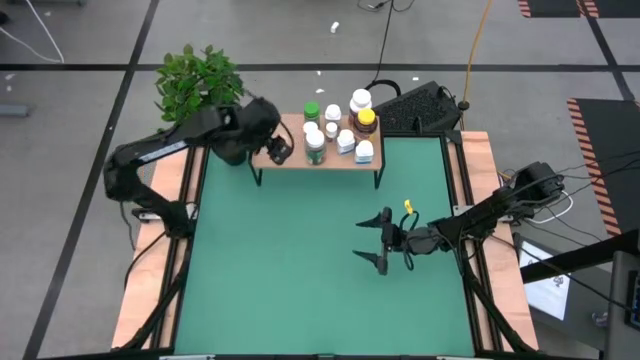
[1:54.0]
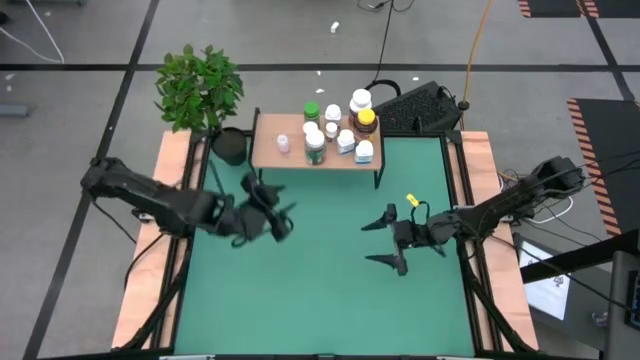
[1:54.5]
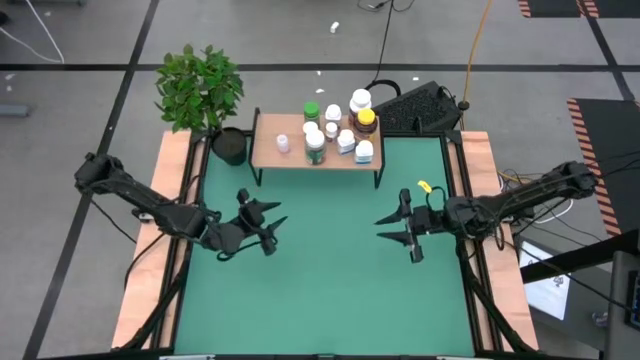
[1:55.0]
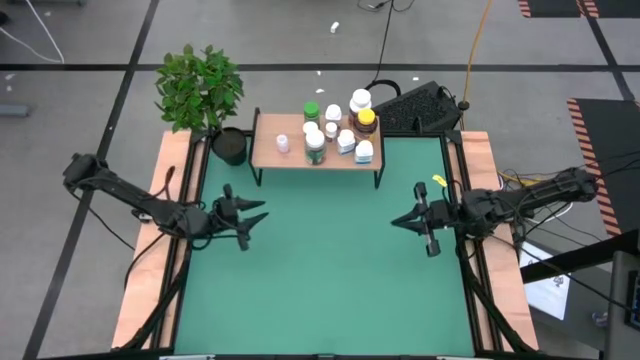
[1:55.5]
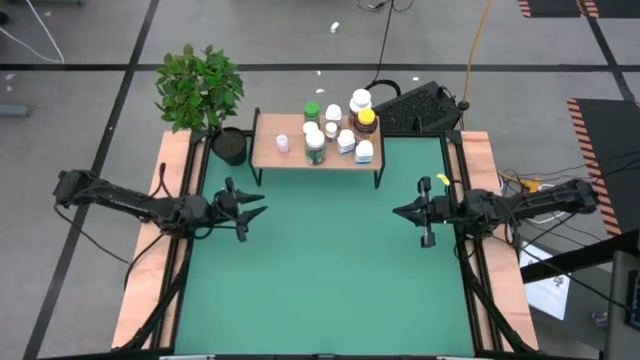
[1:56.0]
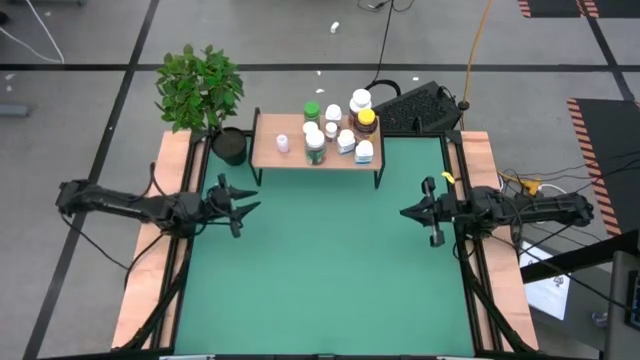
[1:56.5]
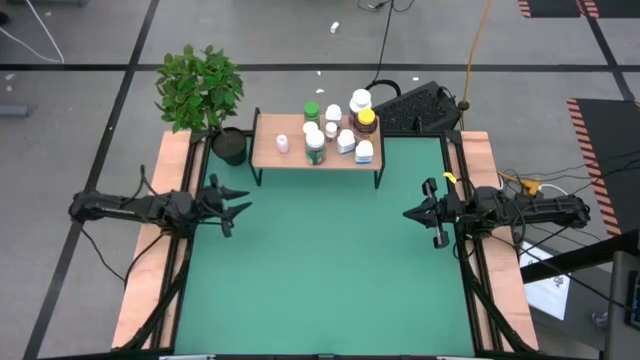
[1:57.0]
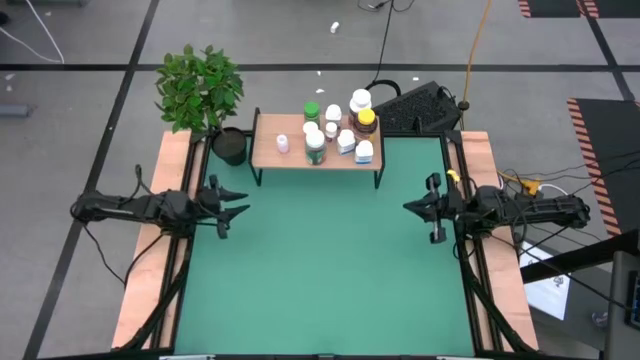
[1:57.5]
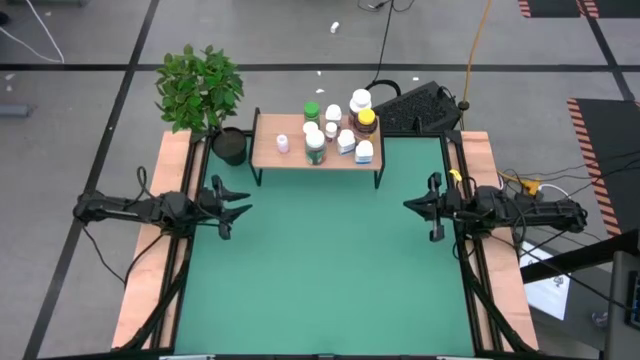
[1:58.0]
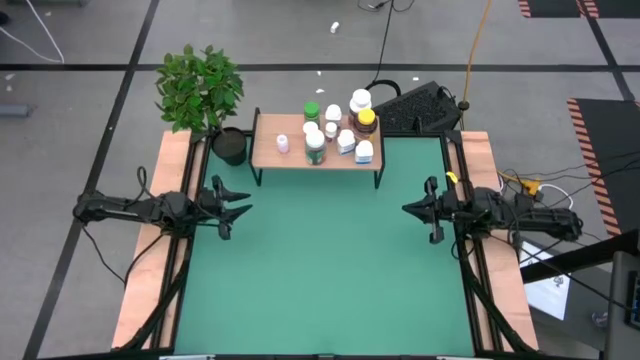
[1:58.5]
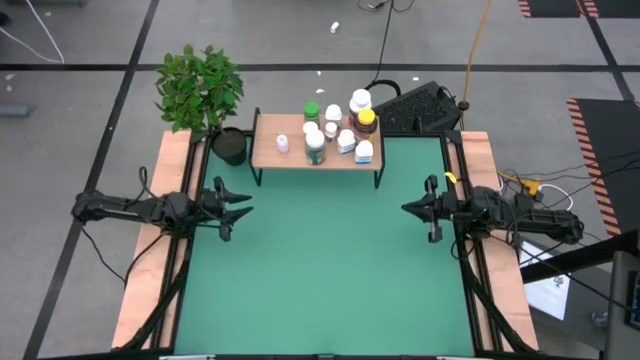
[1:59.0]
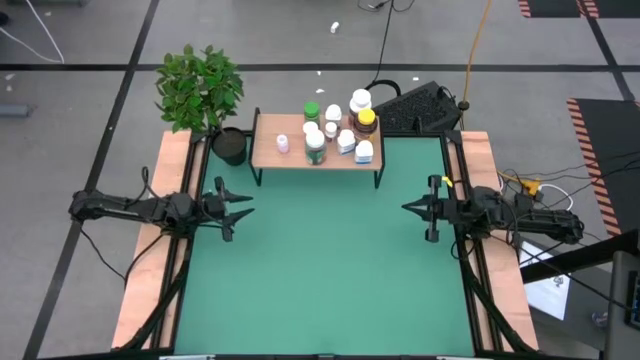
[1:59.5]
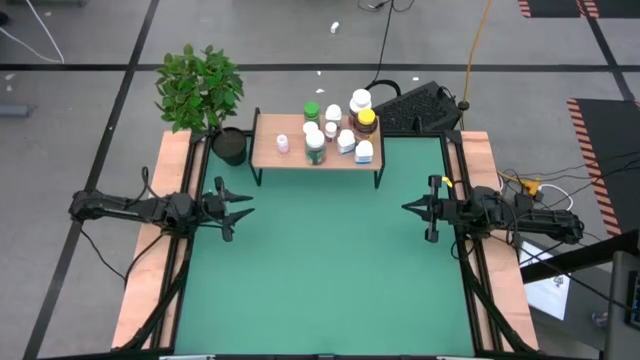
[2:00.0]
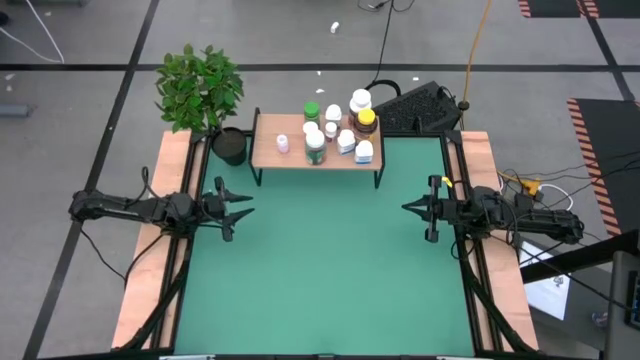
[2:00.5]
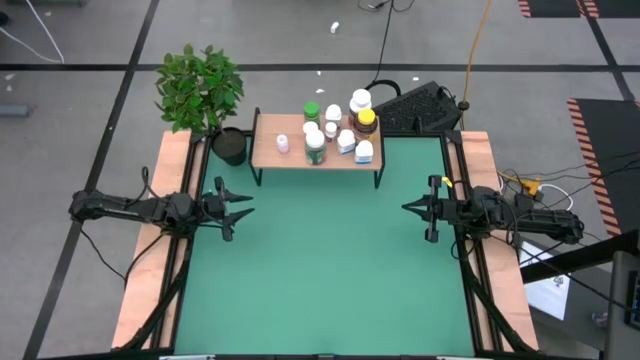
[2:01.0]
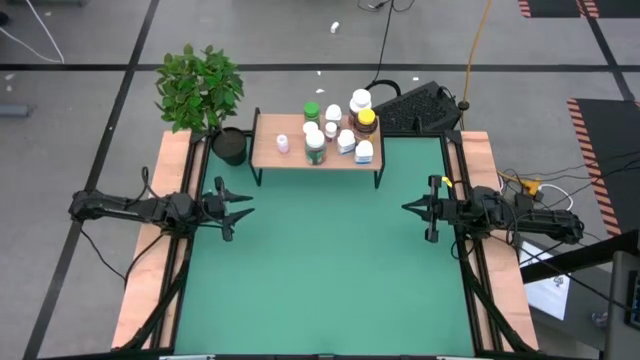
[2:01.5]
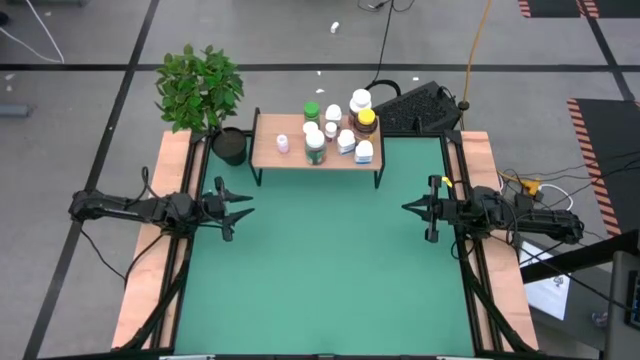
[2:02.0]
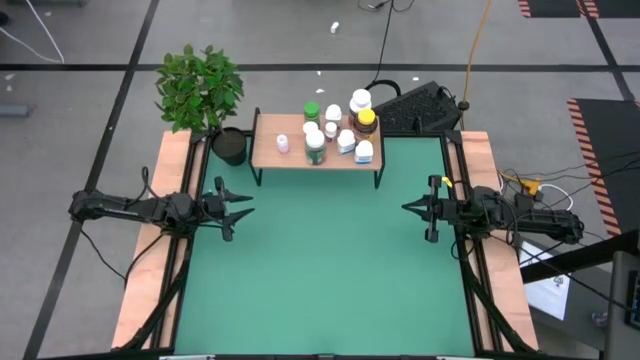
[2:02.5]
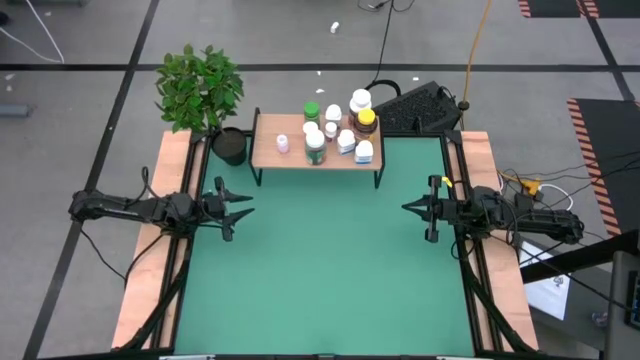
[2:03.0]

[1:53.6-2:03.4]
Task: Pick and place medicine bottles onto shelf by color
Return to Home Position

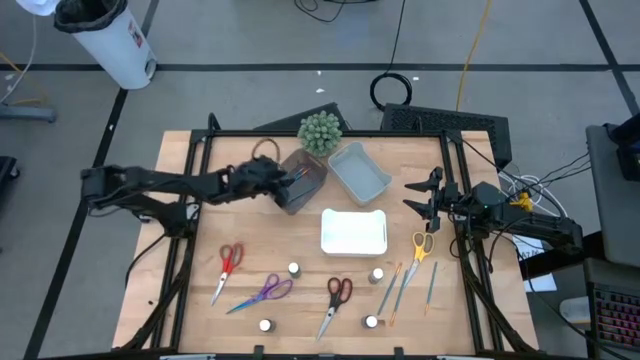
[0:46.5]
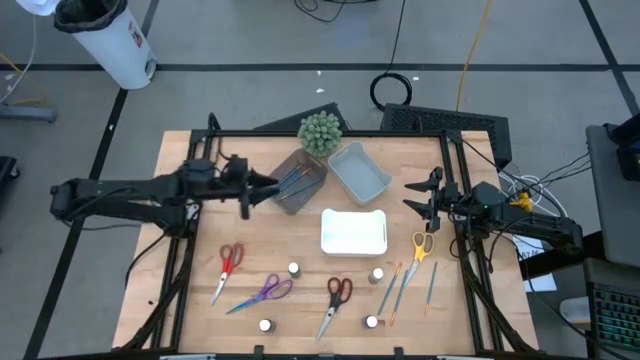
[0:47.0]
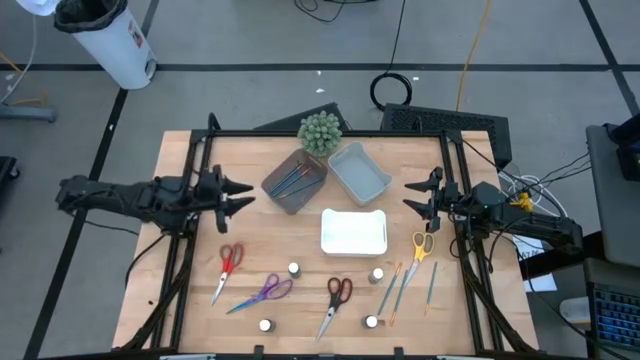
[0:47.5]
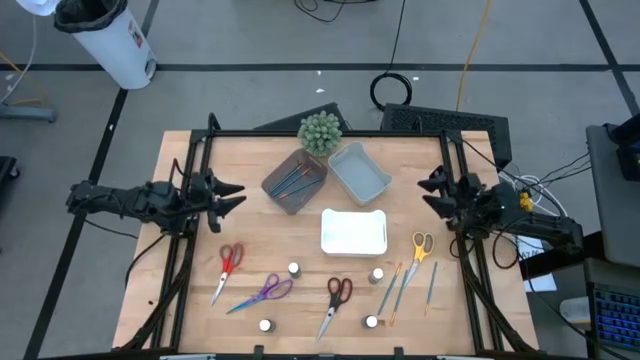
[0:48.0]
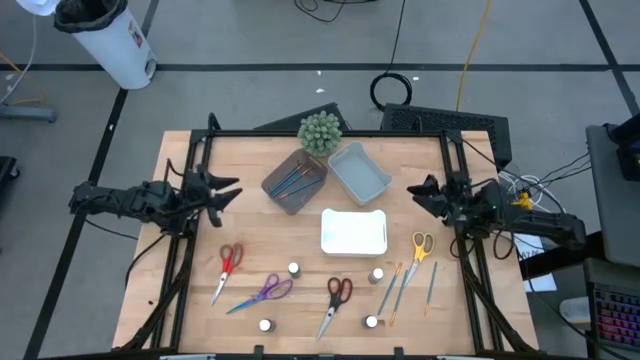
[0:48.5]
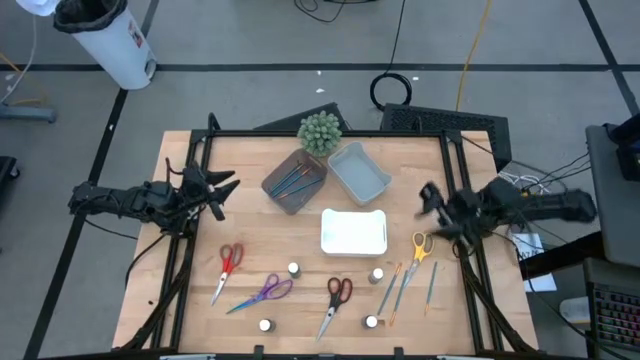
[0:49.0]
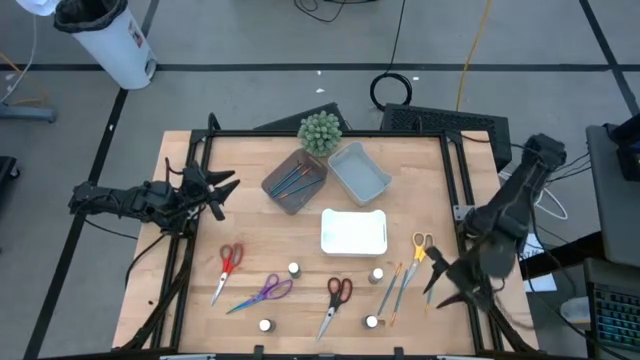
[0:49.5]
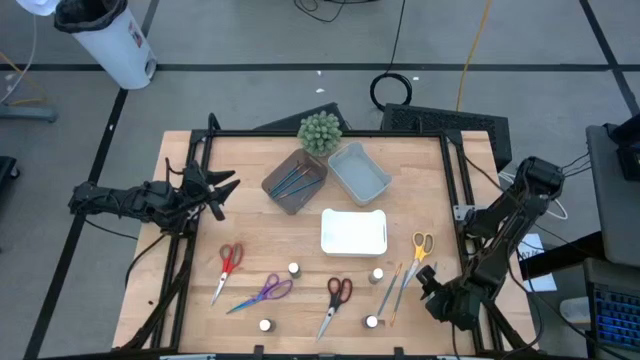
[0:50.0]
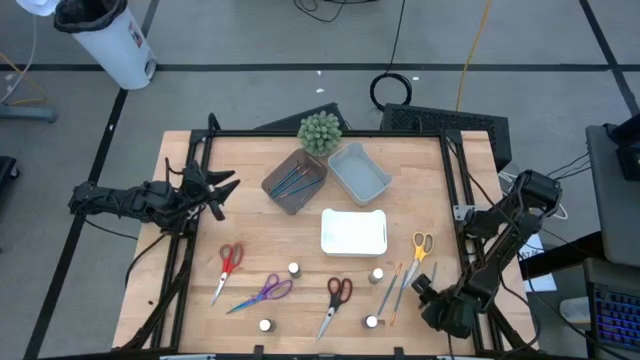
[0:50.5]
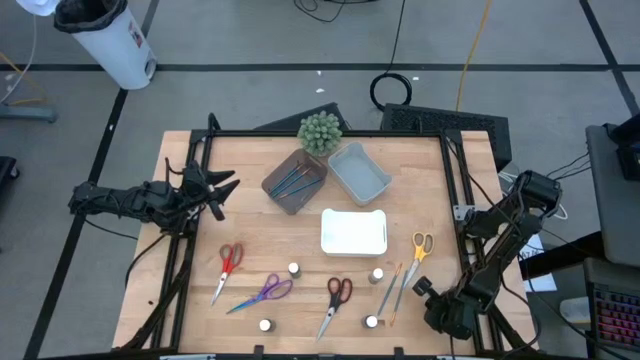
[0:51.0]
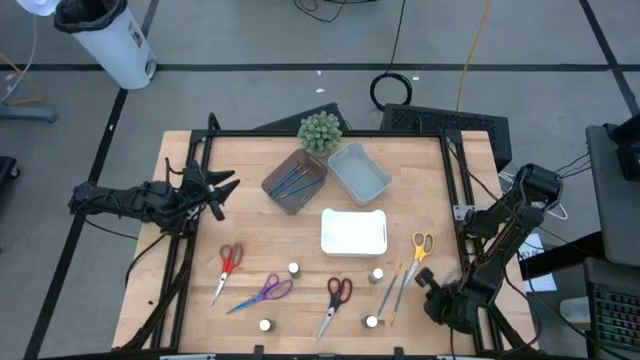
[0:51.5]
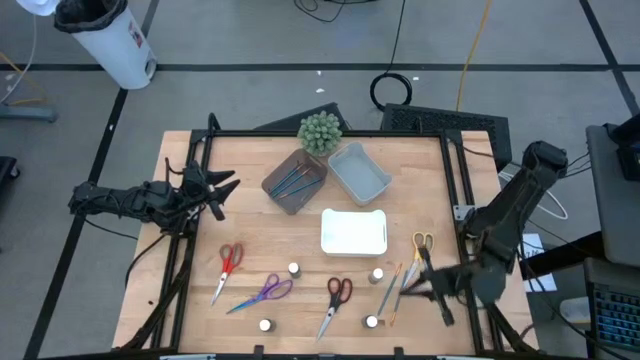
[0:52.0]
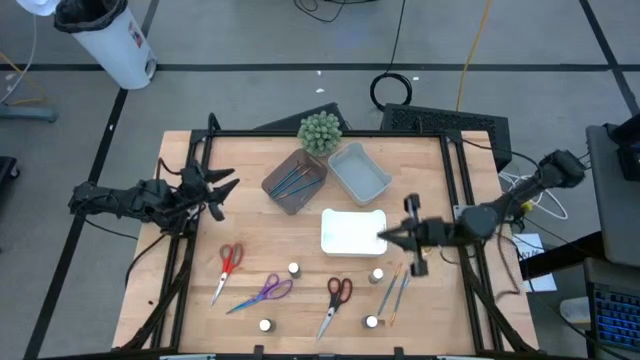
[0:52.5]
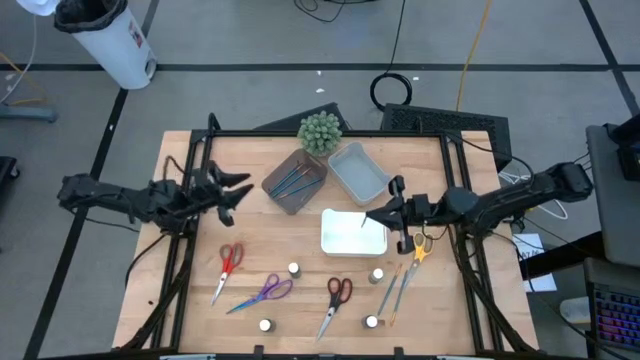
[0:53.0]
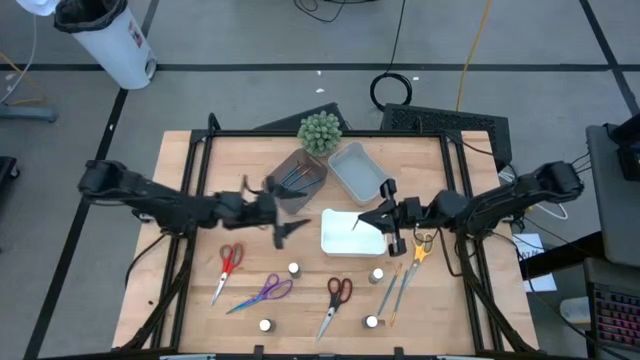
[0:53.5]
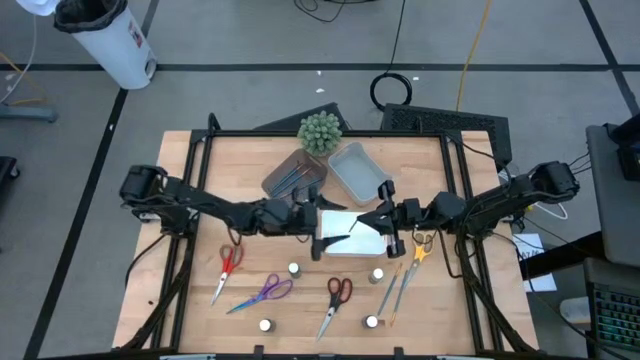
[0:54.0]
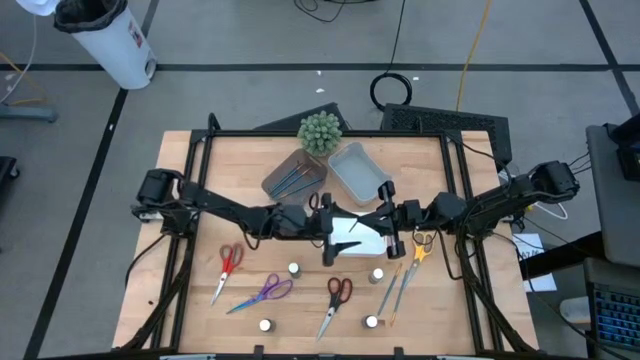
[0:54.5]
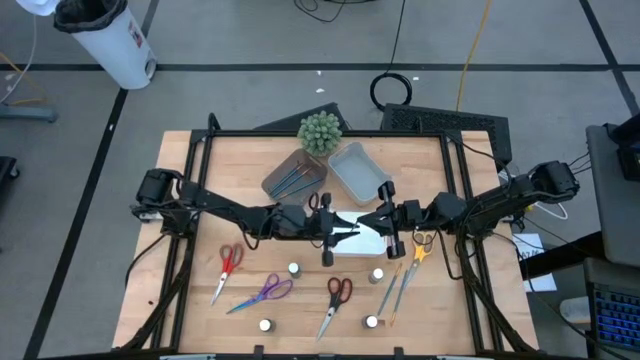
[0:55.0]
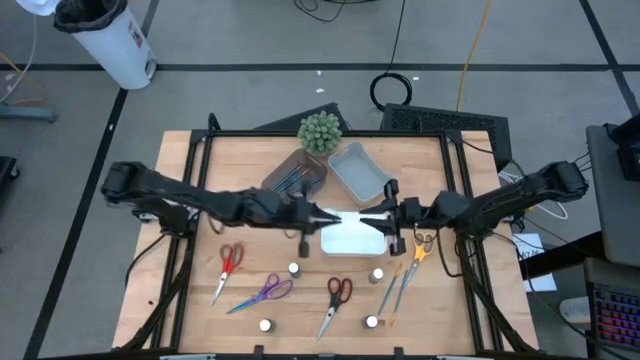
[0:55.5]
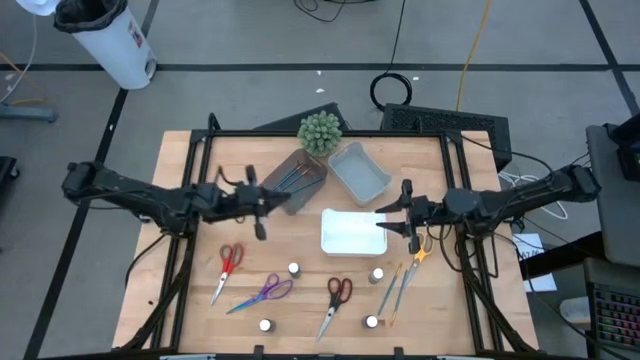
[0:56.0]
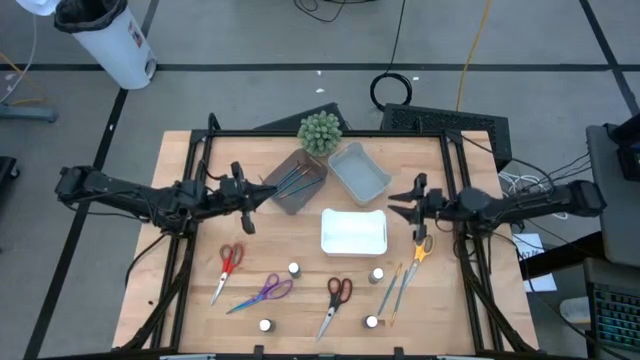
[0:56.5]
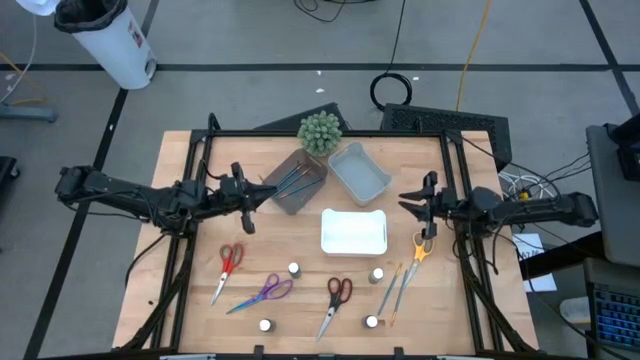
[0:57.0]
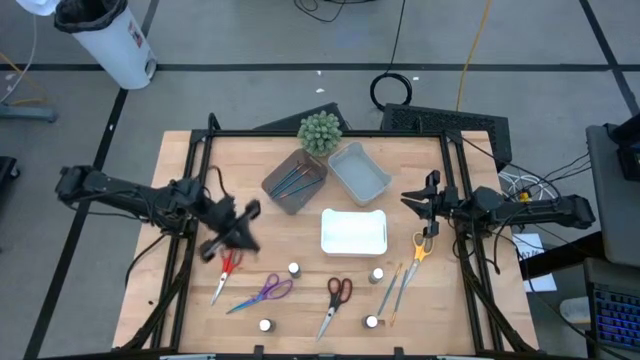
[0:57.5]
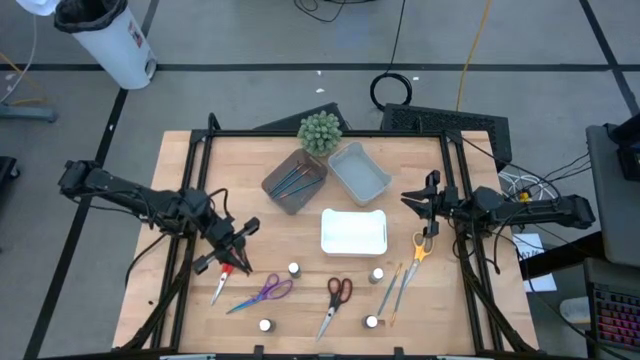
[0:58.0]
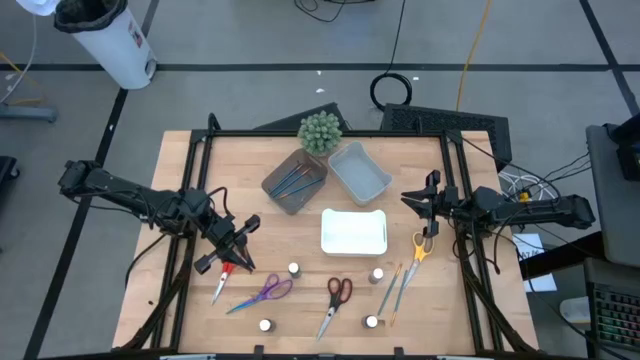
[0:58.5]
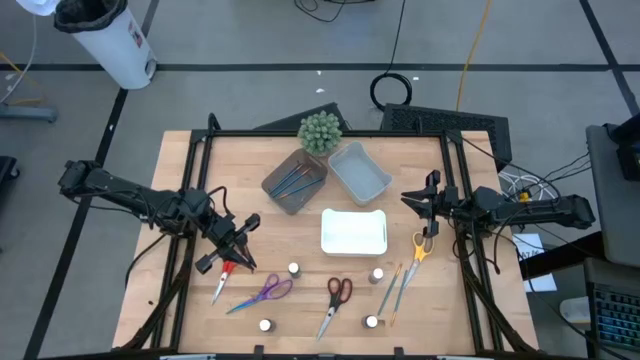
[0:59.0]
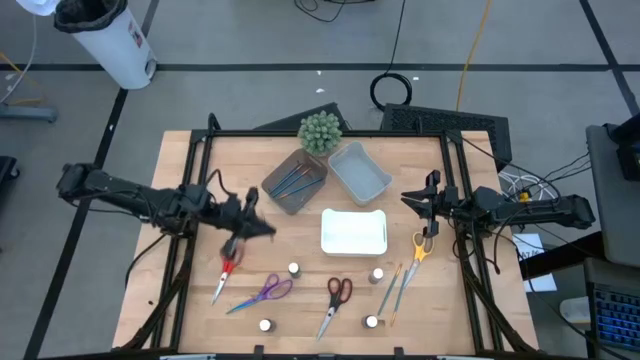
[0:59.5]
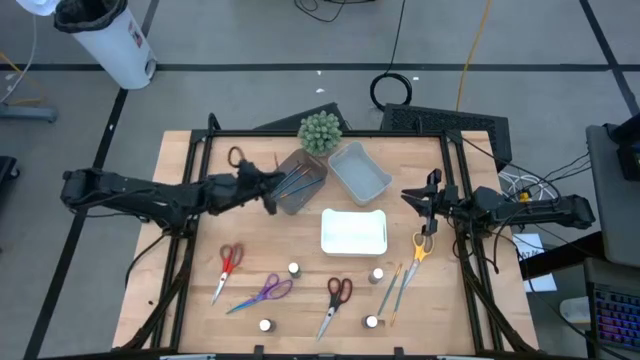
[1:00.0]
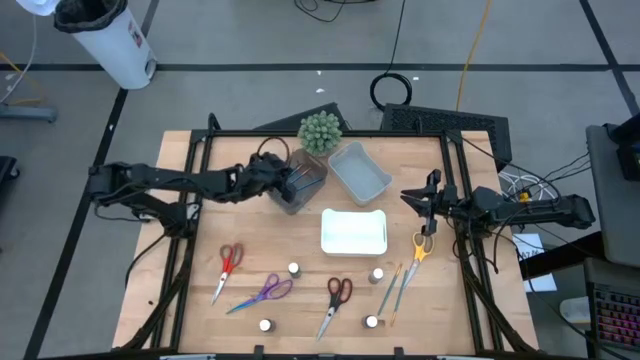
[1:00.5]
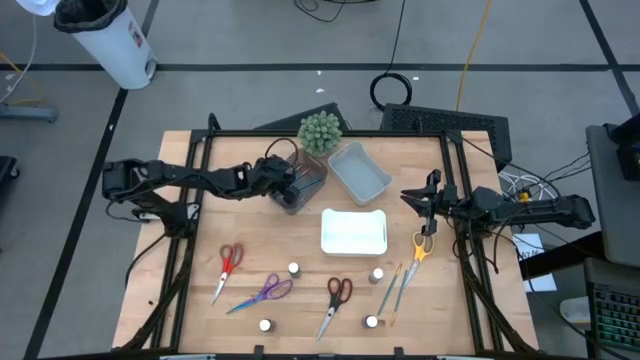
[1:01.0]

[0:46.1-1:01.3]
Task: Pick & Place Paint Supplies
Put the blue paint brush into the black bin
